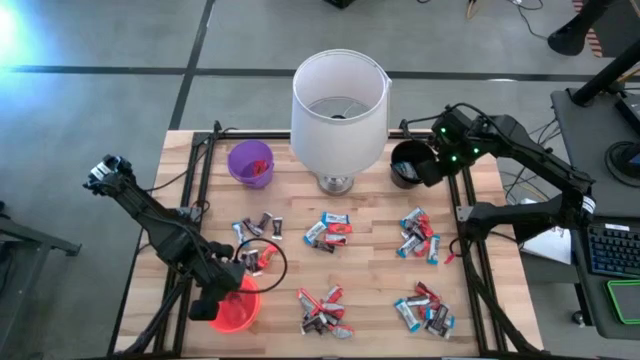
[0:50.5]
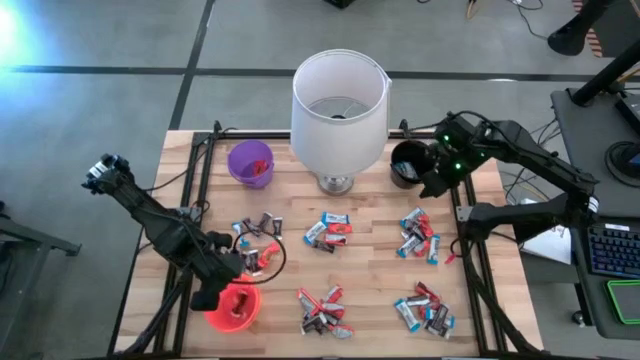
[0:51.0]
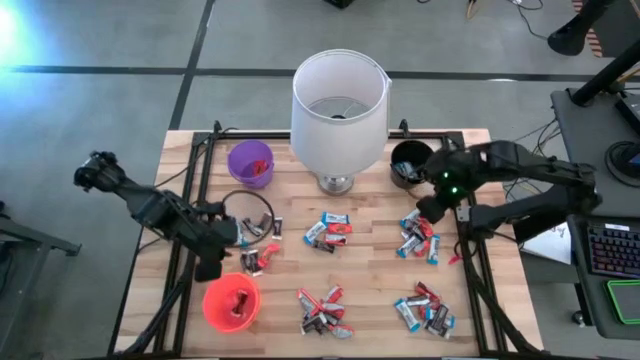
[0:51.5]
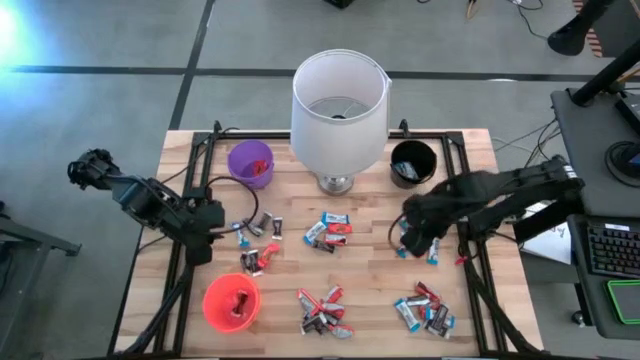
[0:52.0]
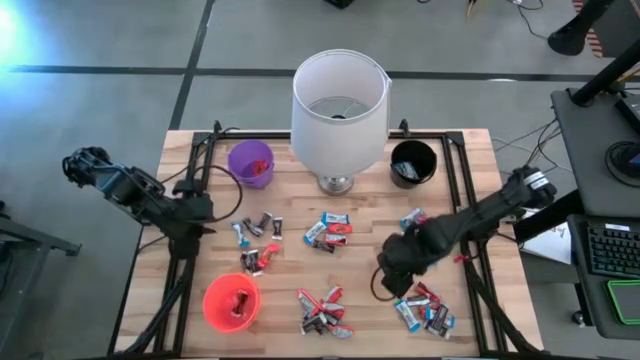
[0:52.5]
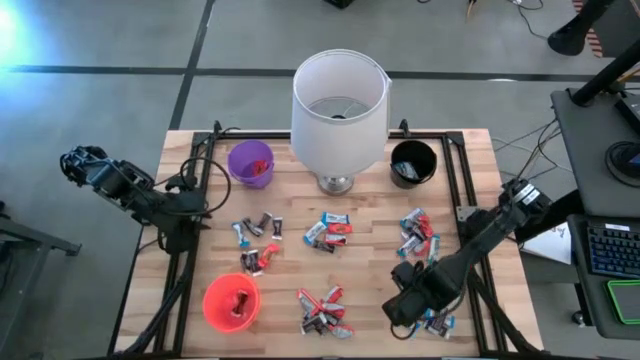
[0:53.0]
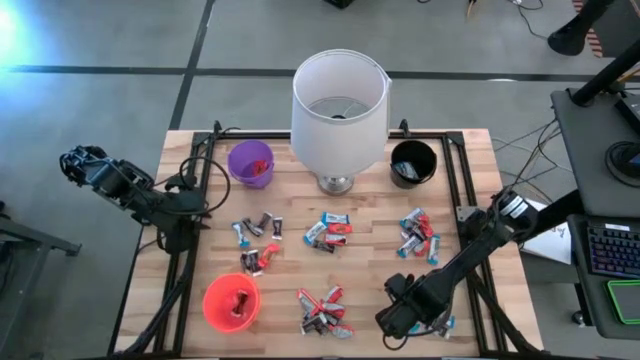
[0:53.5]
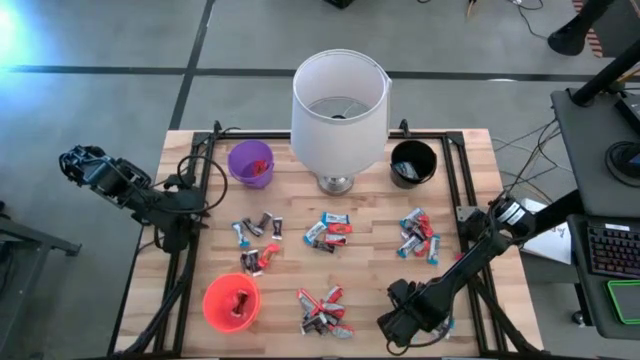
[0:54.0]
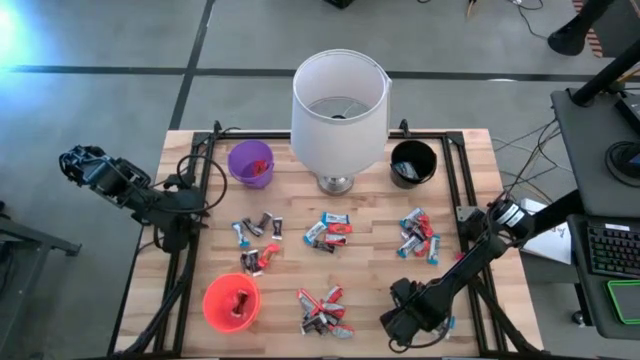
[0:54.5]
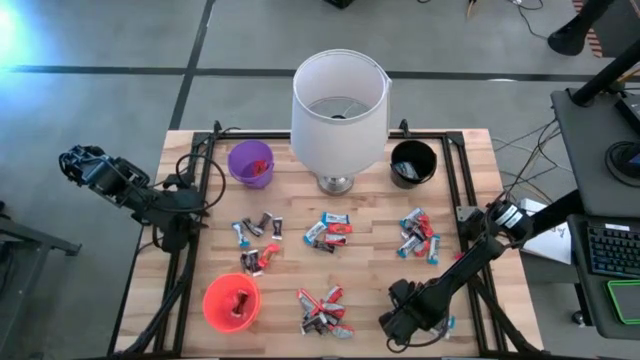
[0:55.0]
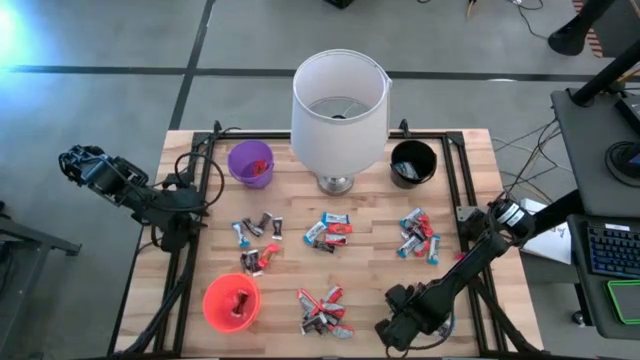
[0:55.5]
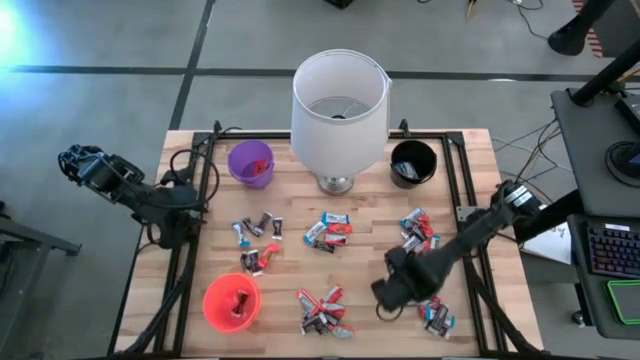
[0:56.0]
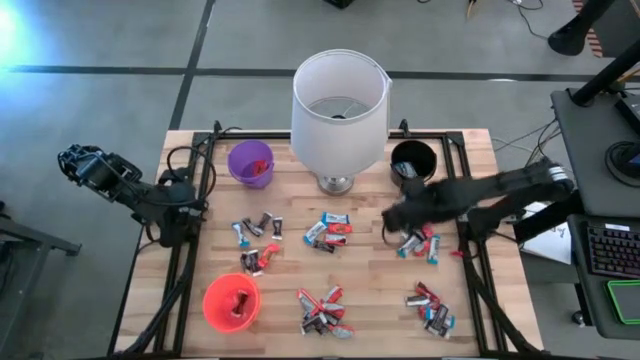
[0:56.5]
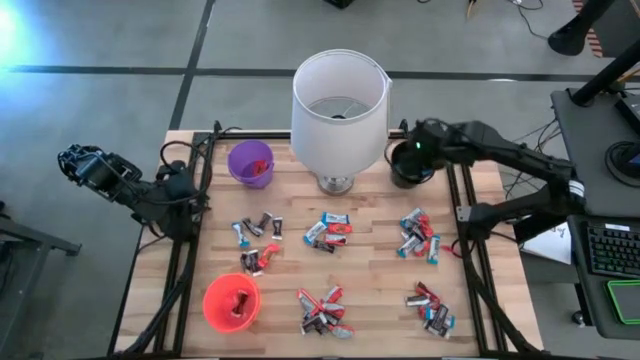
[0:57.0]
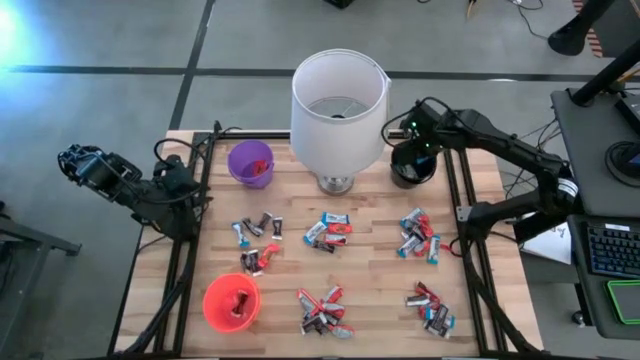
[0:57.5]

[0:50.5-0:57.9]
Task: Sort candy
Put the white chocolate into the black bin

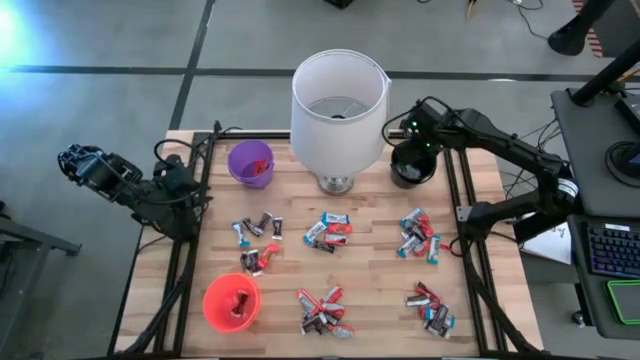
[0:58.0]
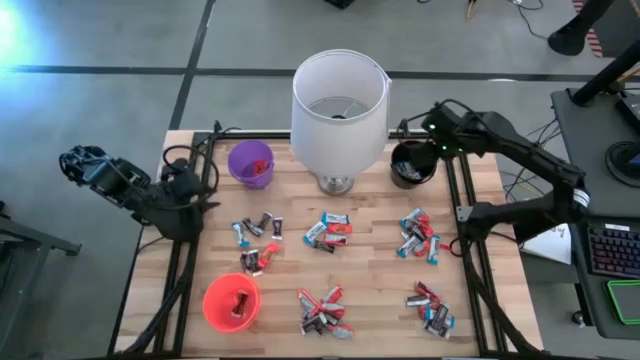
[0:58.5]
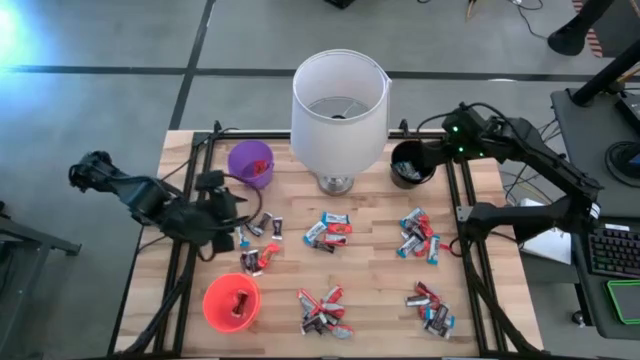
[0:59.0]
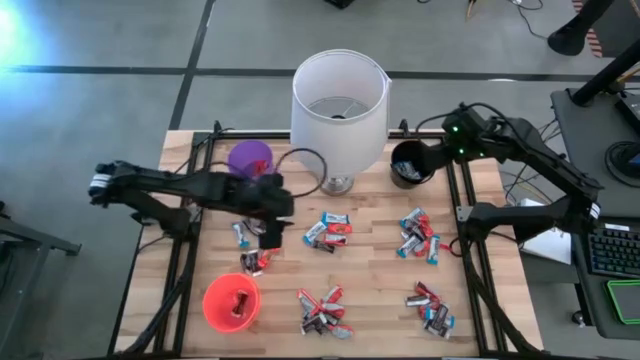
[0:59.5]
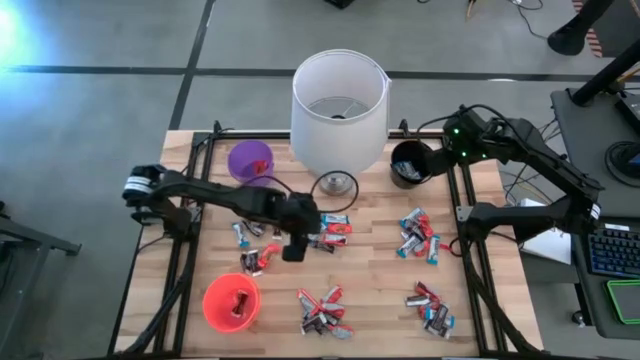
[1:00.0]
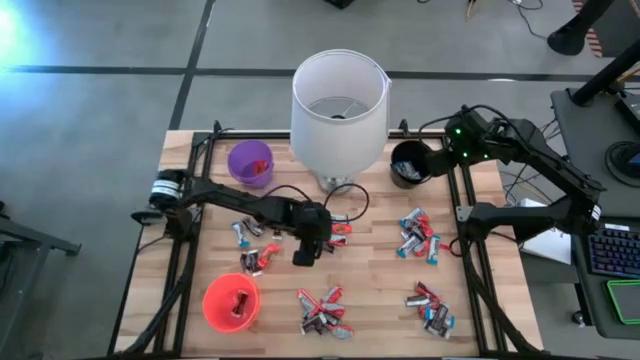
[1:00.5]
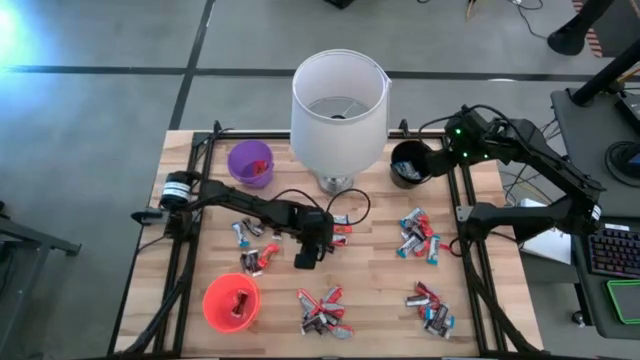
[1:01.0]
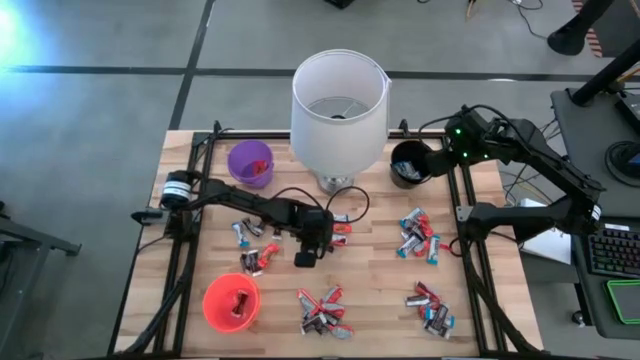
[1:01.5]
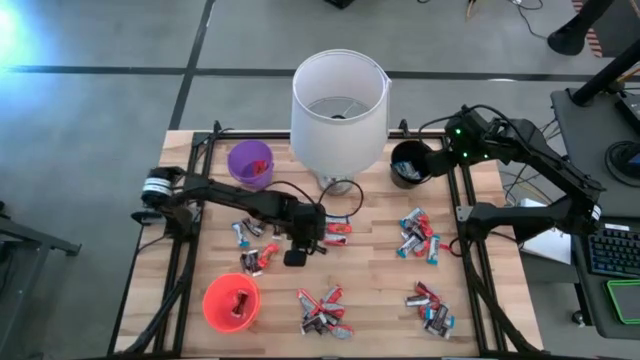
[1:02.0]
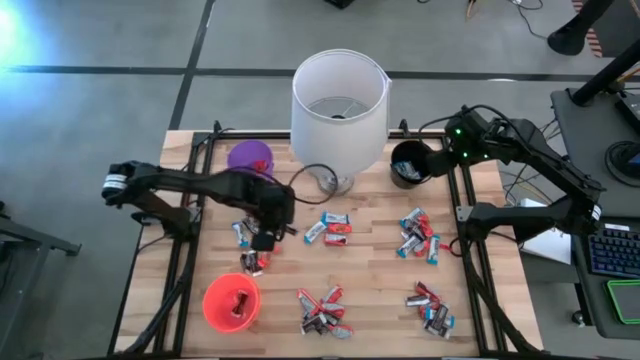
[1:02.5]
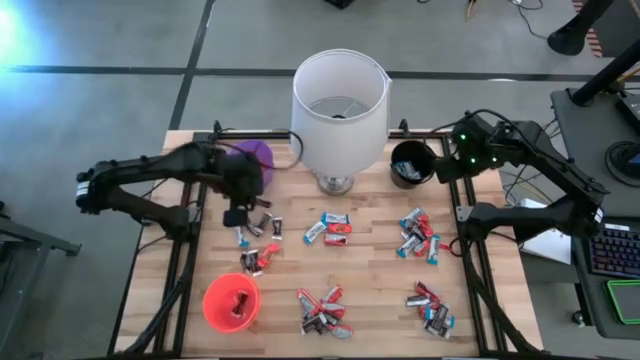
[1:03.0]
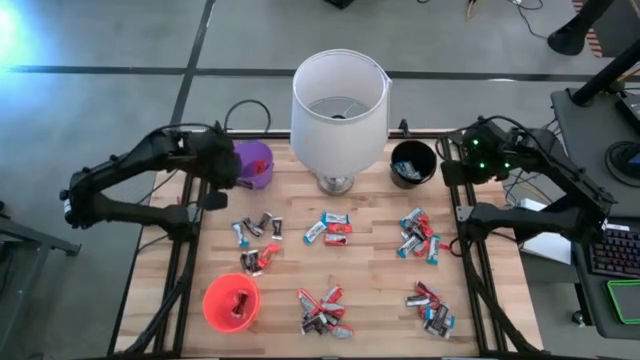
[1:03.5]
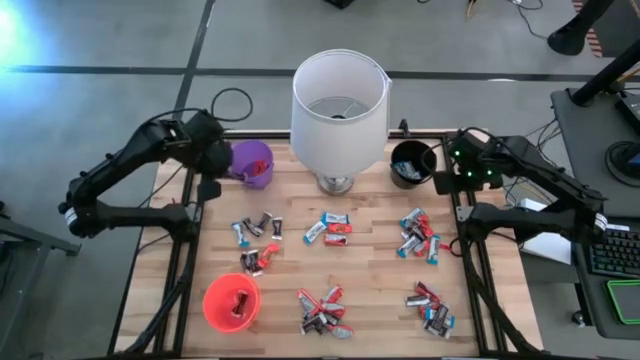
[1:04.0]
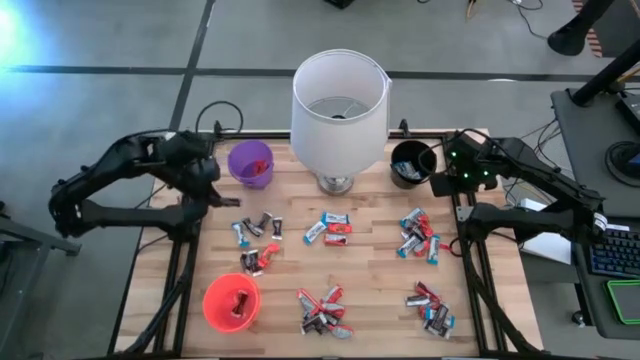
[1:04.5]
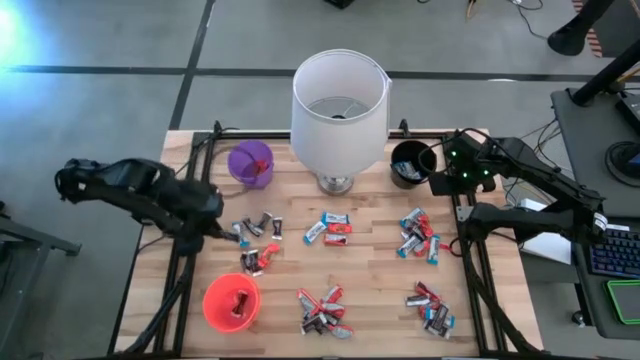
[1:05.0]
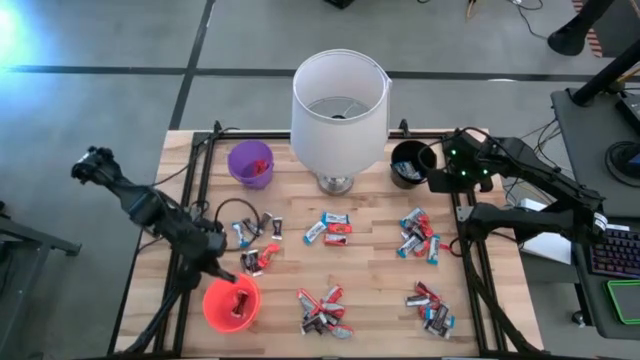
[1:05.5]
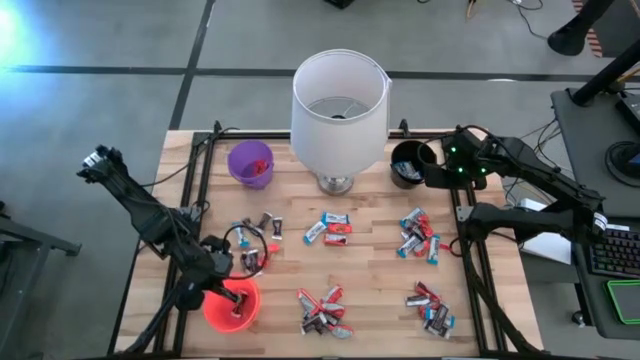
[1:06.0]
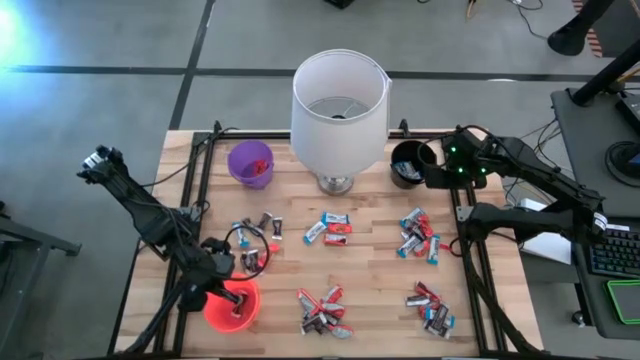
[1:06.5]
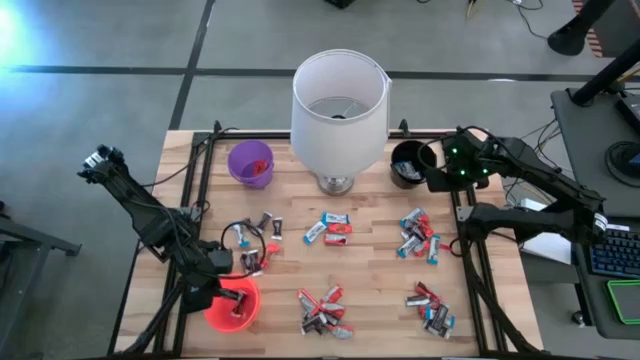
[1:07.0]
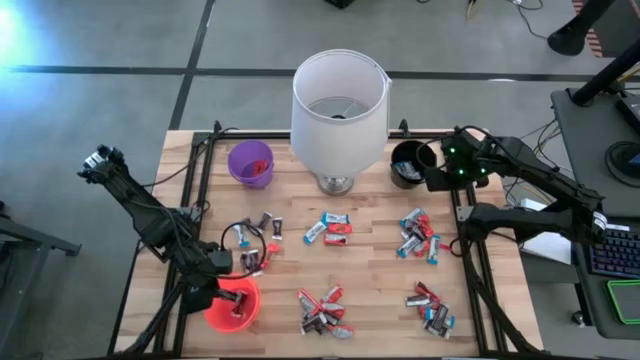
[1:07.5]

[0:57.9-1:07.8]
Put the black chocolate into the orange bucket

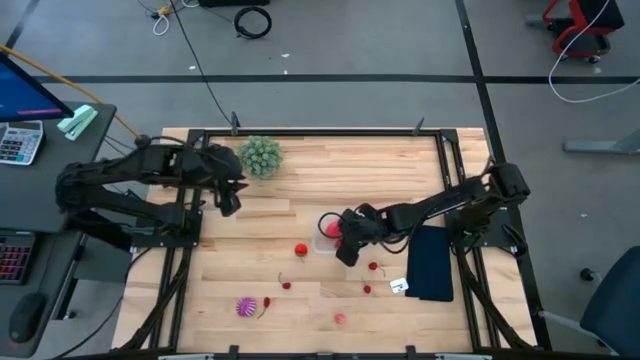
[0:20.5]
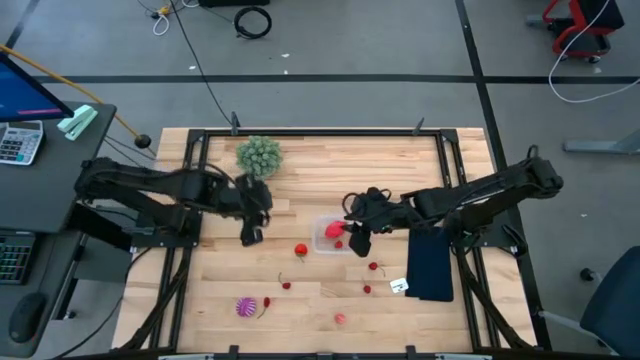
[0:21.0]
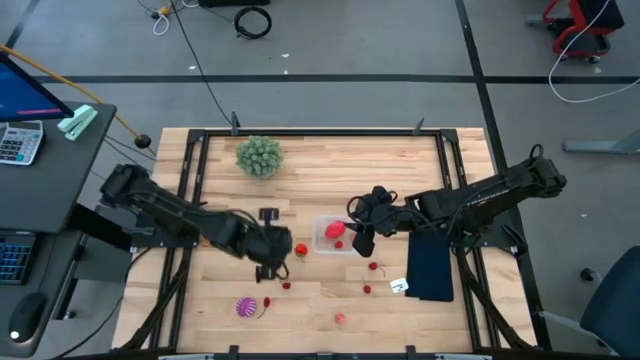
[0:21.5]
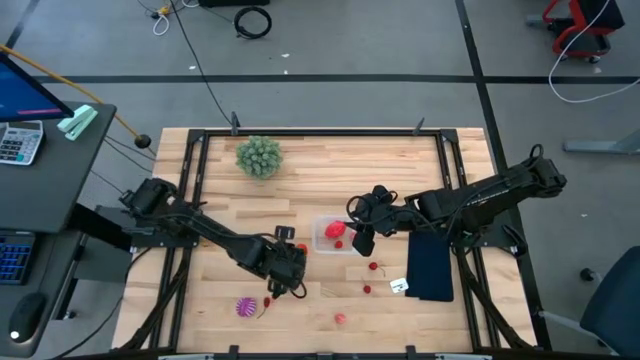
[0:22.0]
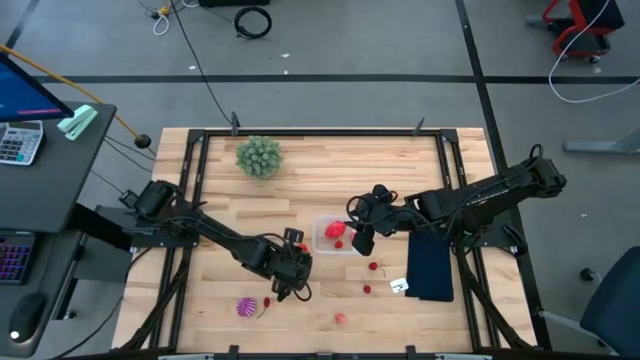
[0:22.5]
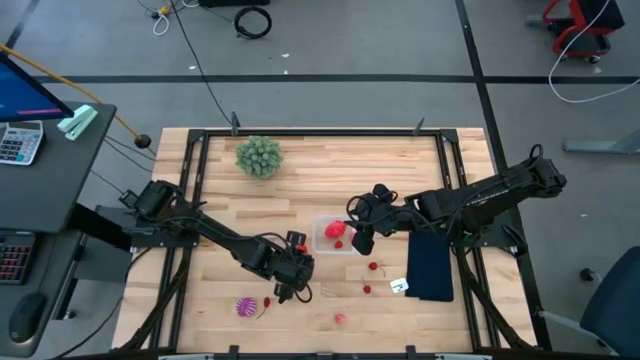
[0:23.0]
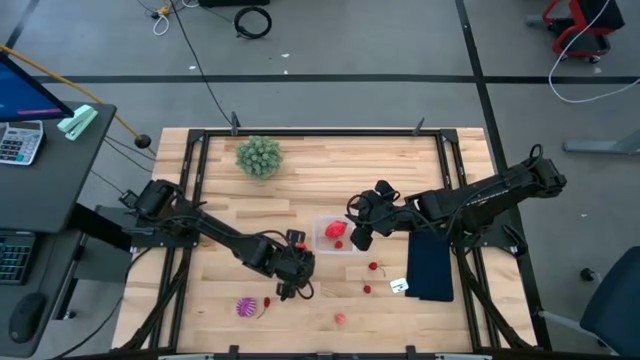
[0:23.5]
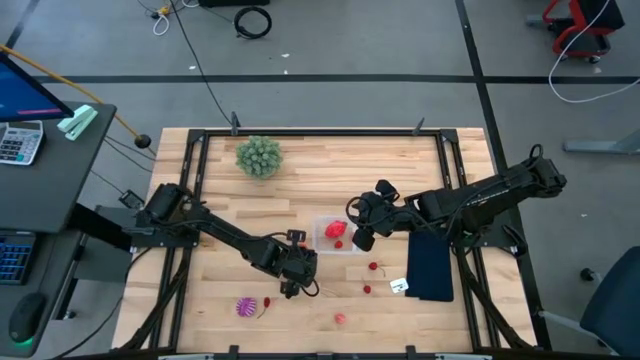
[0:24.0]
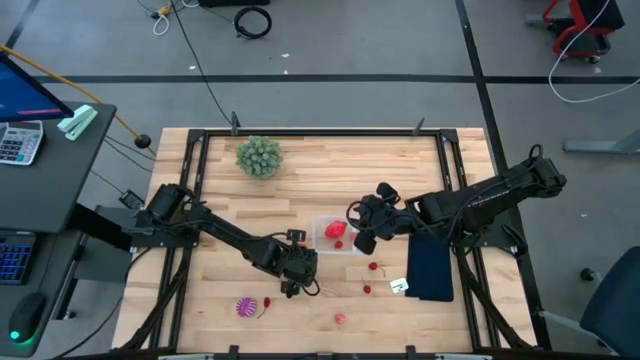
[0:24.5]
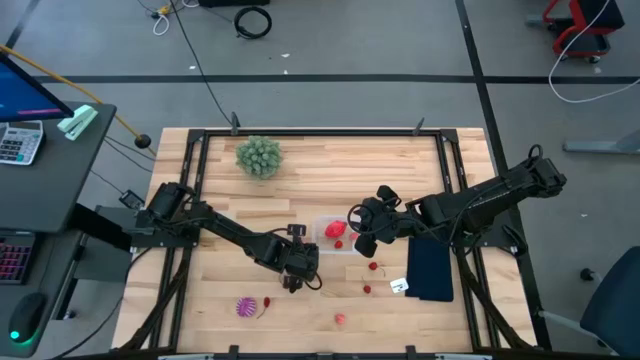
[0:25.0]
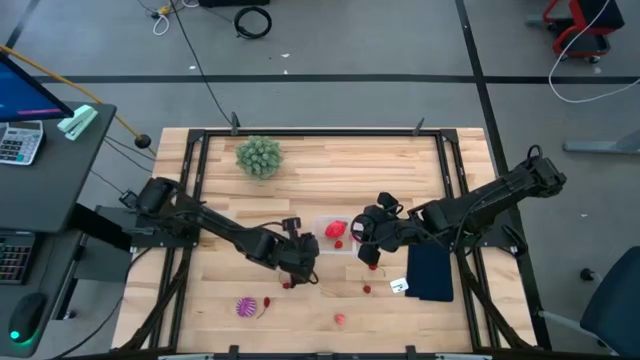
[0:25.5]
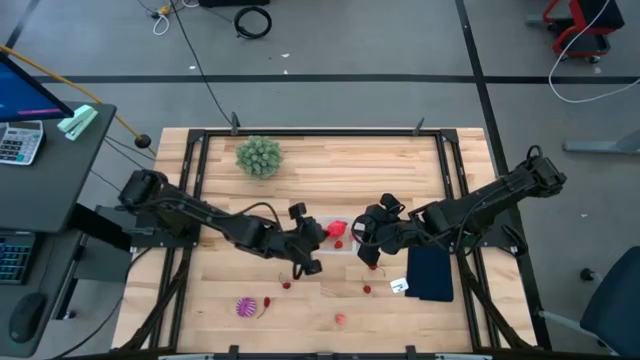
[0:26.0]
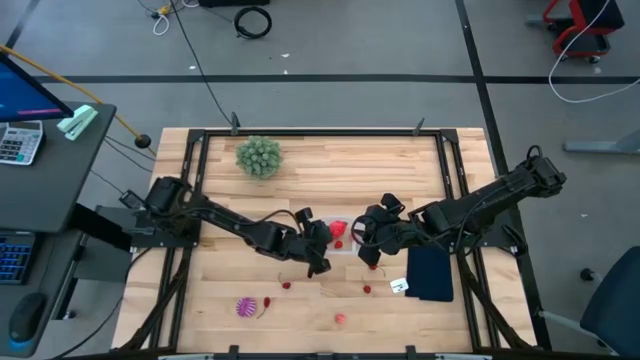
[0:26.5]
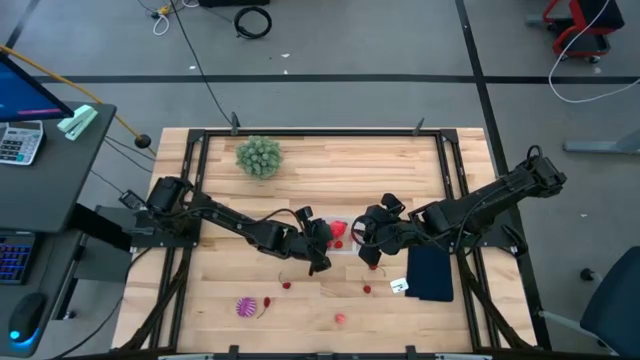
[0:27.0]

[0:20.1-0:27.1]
Task: Pick and placing Produce into tupperware
Put the red strawberry into the transparent bin
